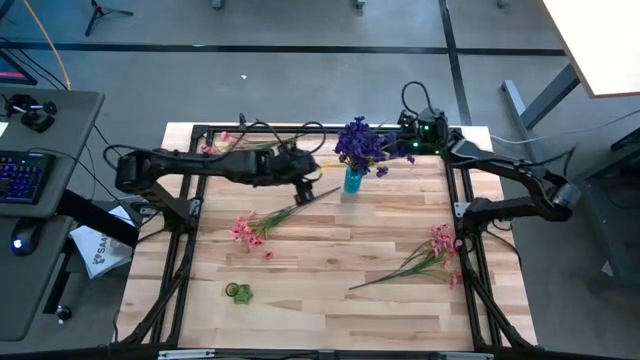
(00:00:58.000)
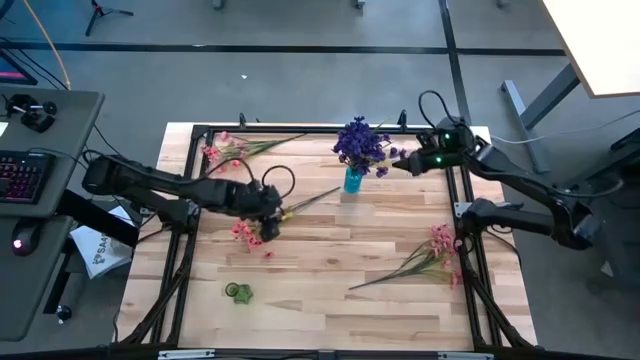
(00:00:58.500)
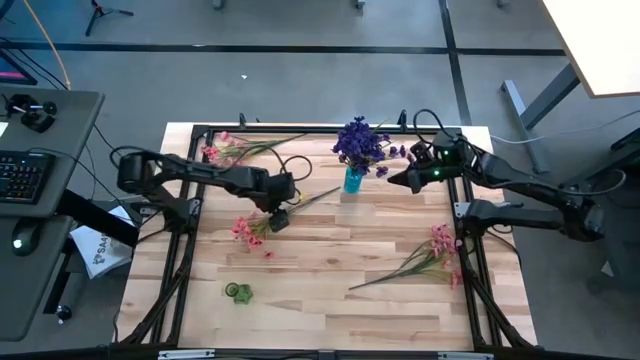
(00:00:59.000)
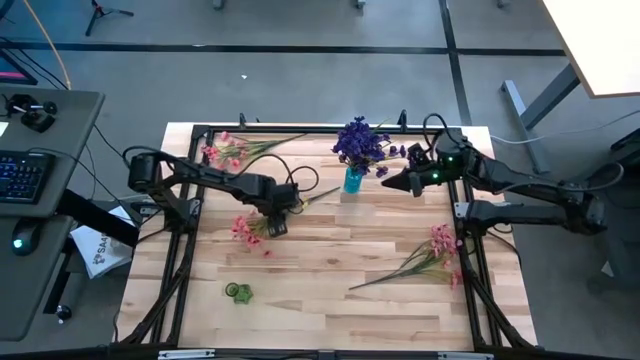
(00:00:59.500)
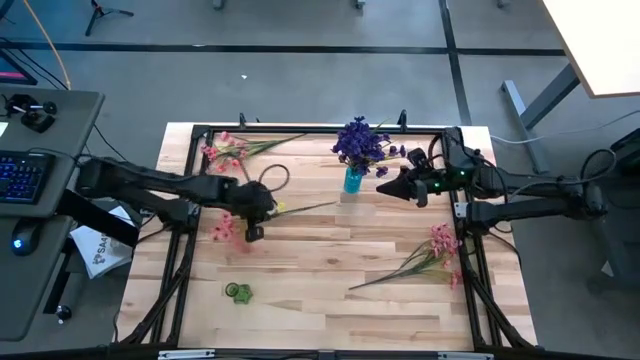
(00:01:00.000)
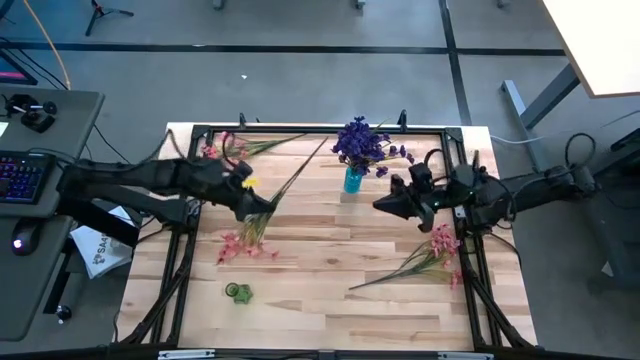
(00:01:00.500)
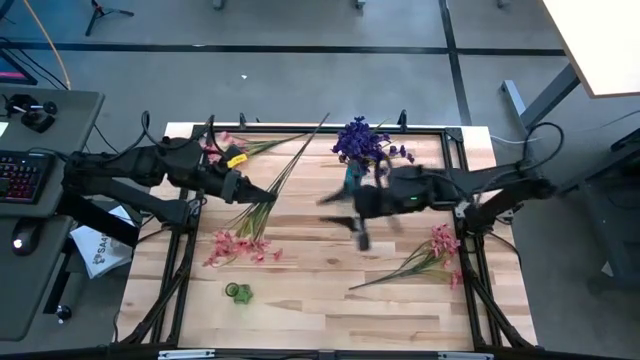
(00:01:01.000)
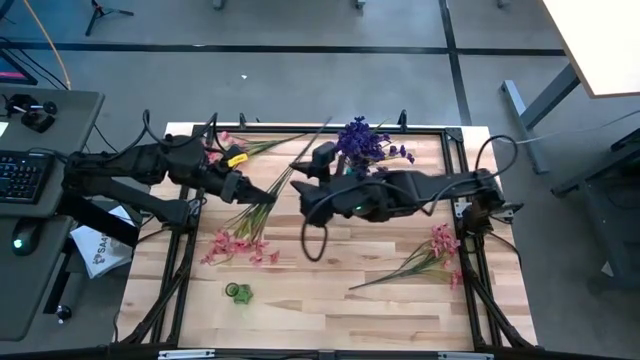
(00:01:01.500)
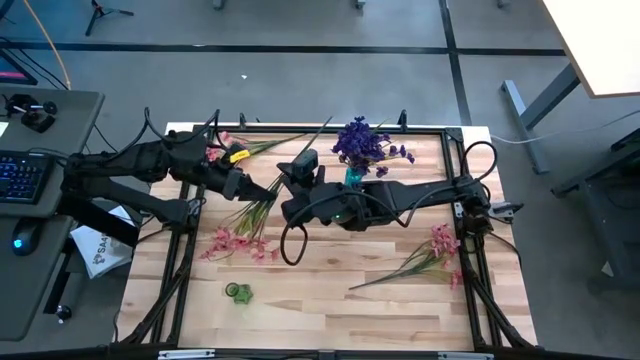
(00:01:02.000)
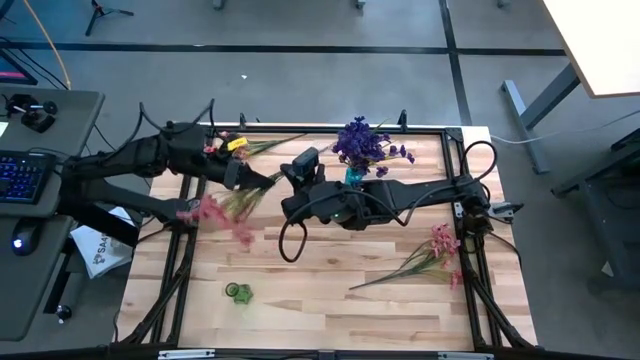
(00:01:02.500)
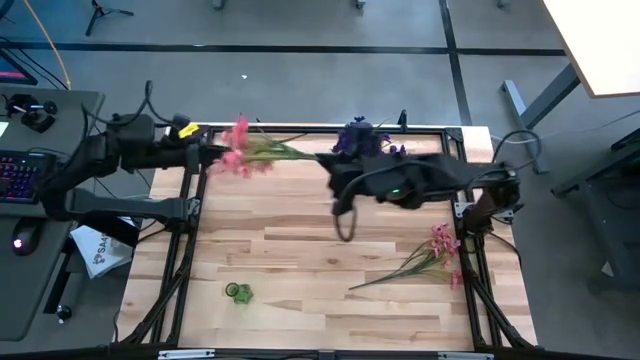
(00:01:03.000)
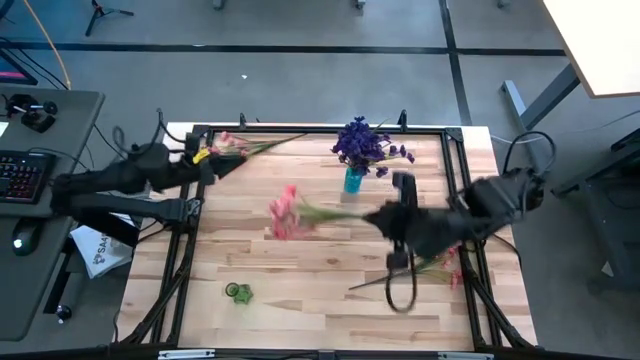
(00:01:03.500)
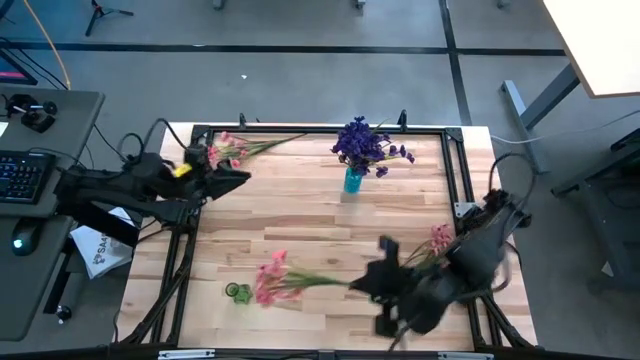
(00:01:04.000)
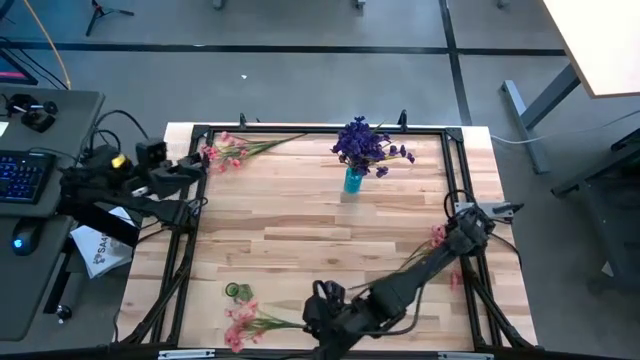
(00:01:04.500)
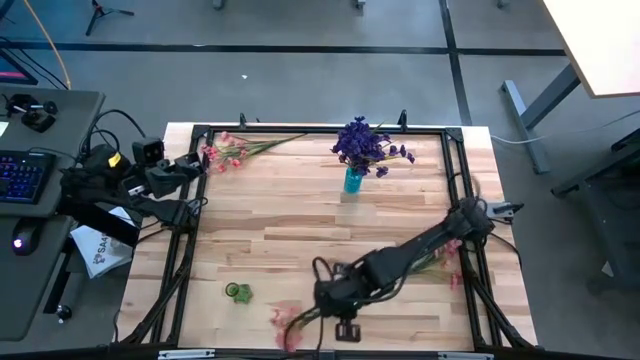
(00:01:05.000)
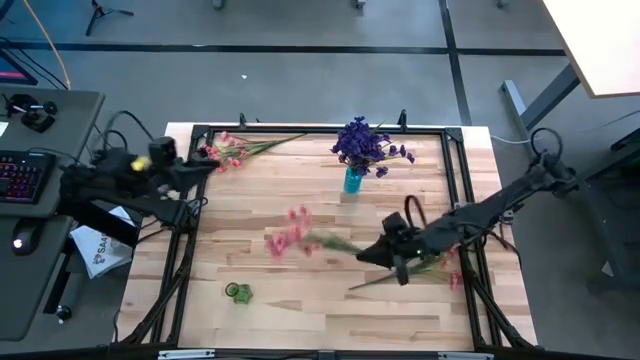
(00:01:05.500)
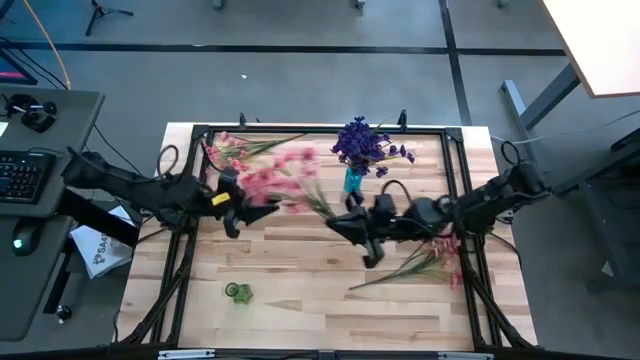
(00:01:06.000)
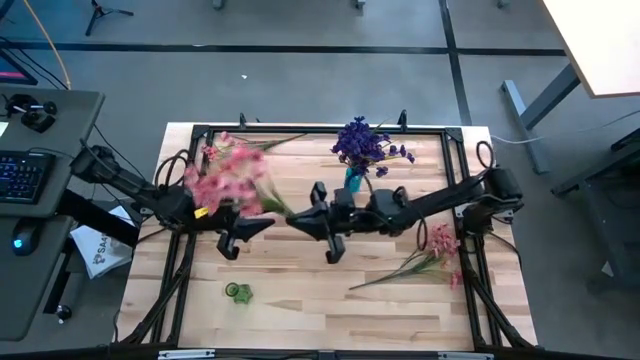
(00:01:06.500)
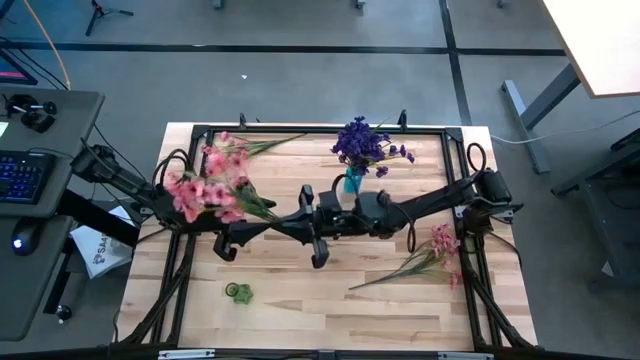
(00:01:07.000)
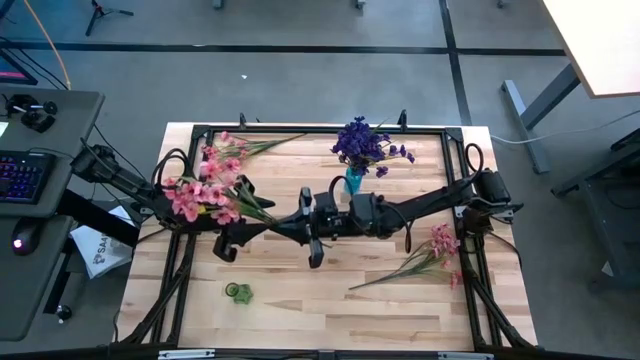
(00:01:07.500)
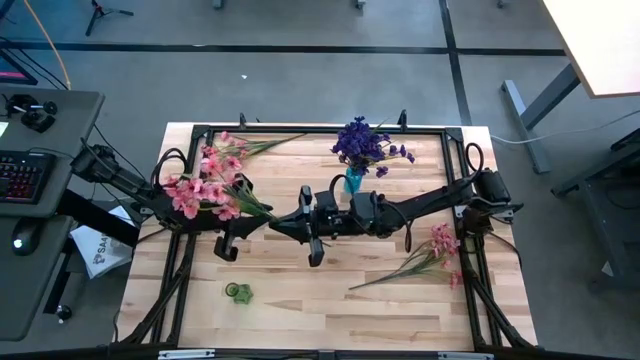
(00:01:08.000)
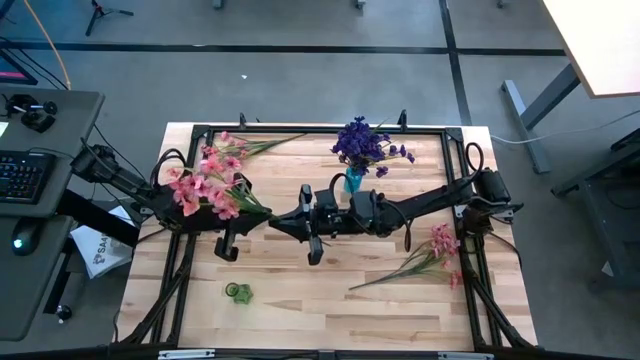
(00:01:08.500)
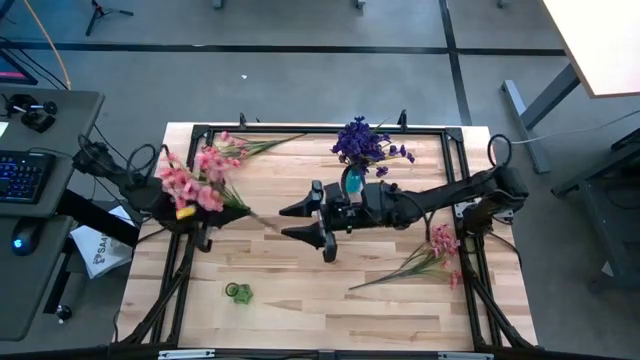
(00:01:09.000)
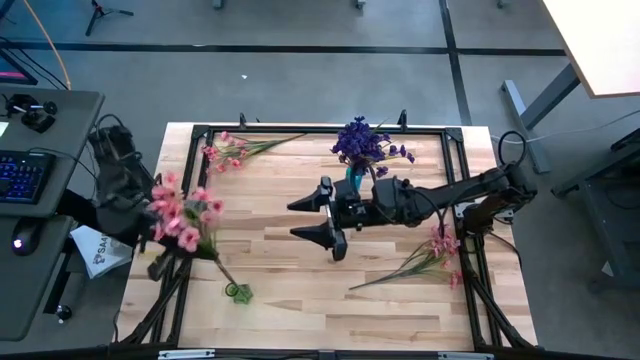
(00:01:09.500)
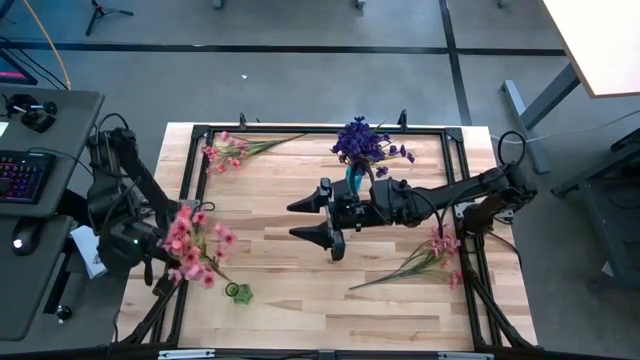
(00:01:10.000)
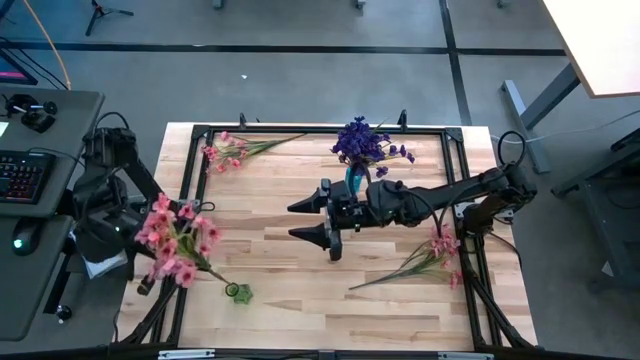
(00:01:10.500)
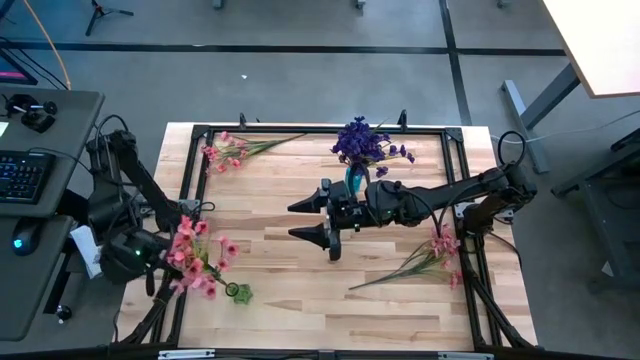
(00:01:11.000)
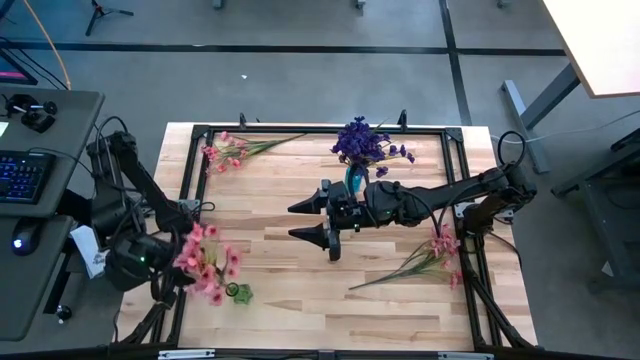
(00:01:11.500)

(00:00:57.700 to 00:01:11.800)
Task: Sort flowers into vase by color
Put the middle pink flowers into the green vase

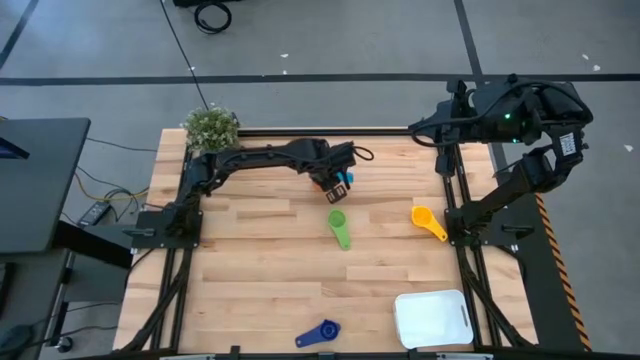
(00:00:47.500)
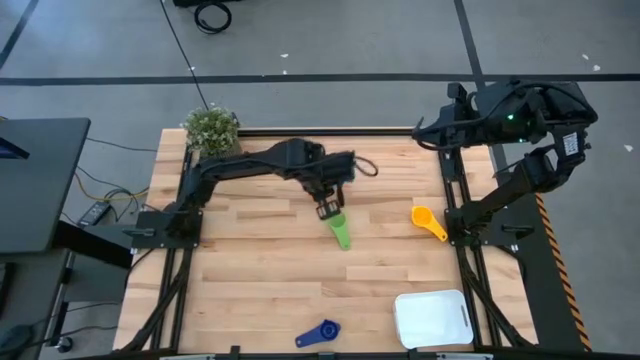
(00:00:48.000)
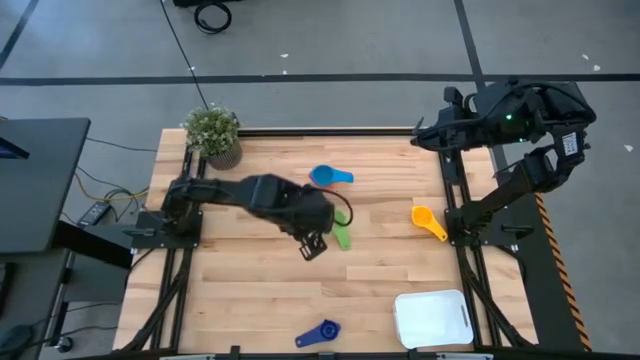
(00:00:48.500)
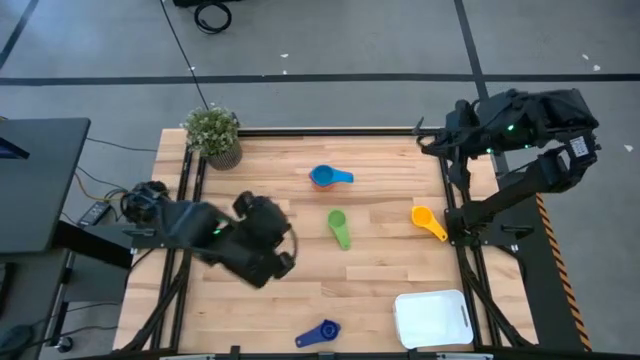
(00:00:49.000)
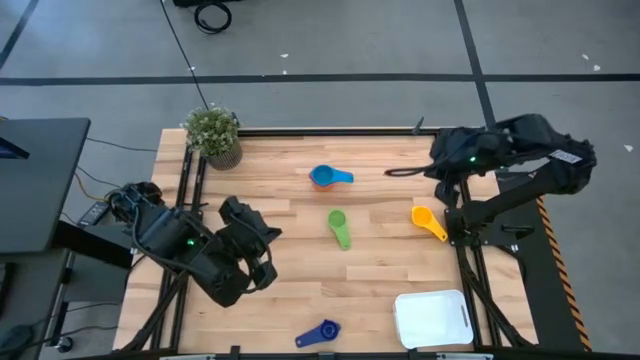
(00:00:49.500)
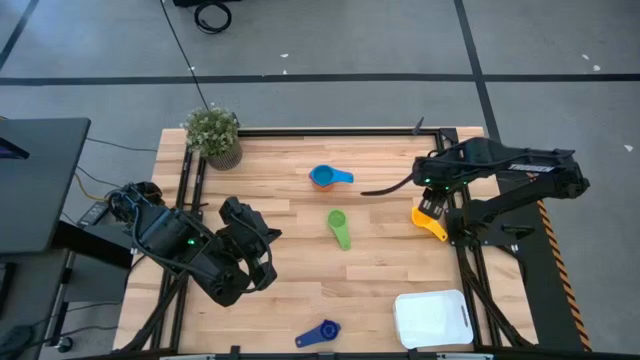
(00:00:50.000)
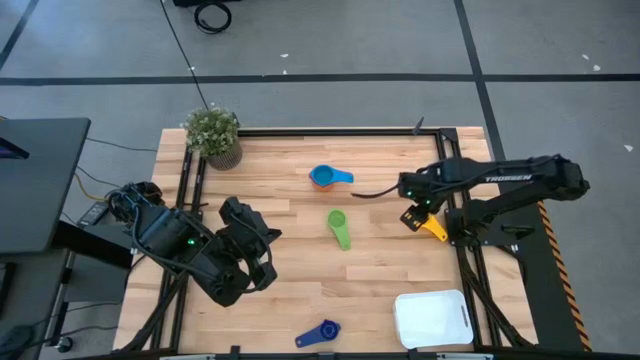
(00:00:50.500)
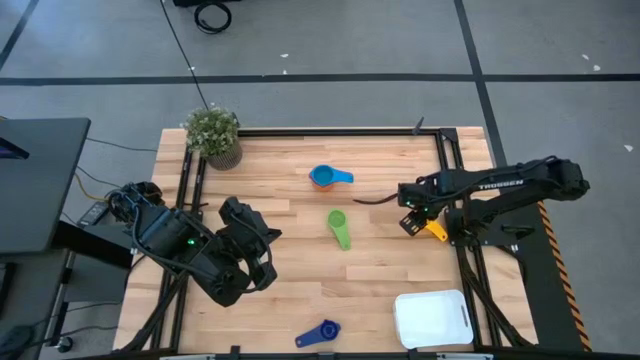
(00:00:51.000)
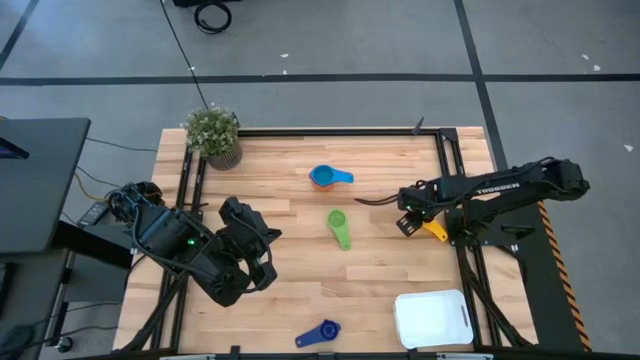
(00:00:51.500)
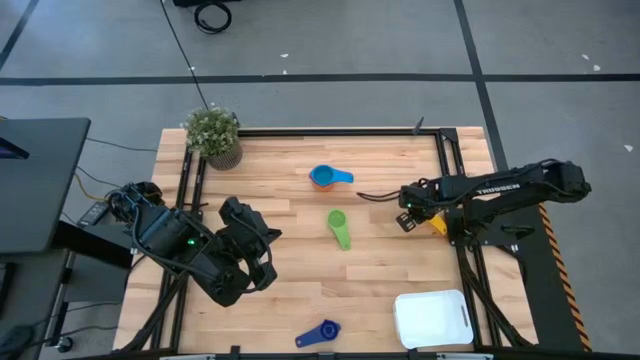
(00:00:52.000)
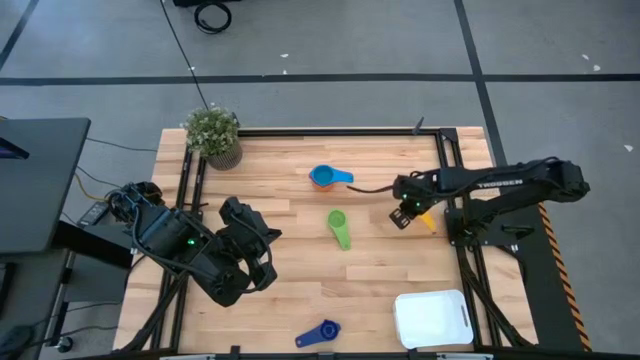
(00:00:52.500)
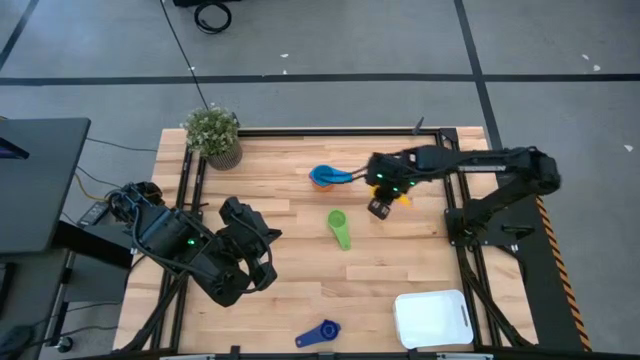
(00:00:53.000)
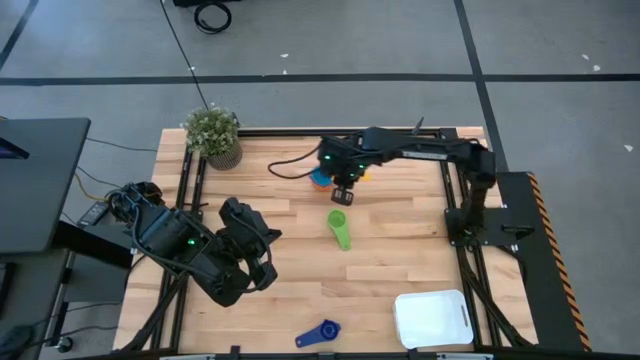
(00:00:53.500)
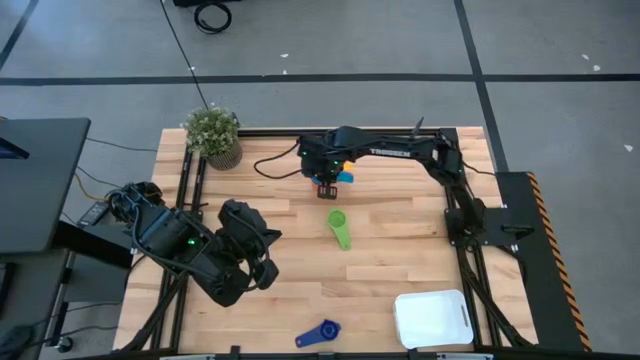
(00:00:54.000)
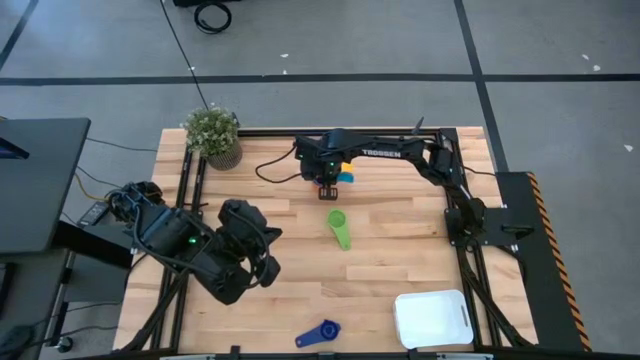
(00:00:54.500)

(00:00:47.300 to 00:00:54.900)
Task: Nest measuring cups in basket
Stack the yellow measuring cup on top of the light blue measuring cup
